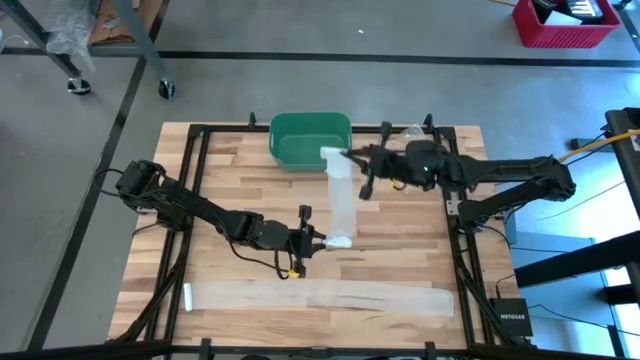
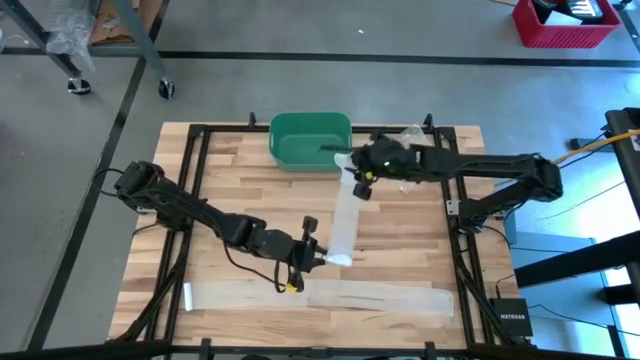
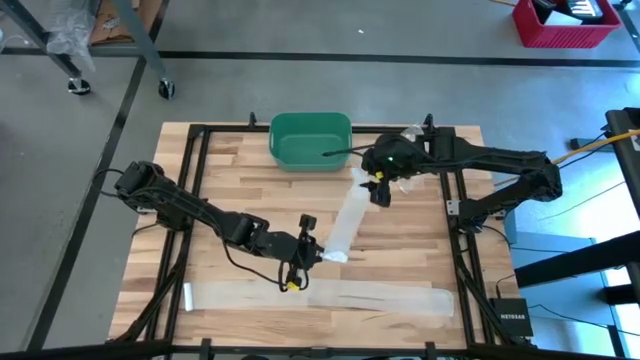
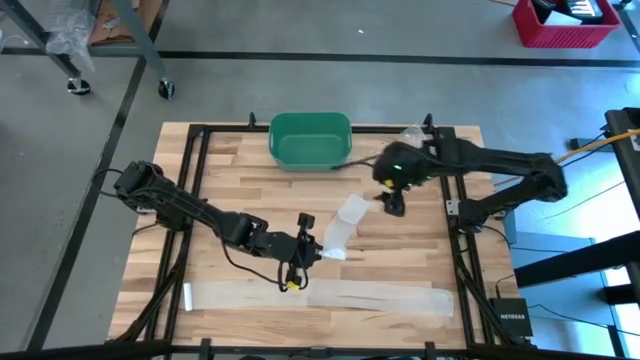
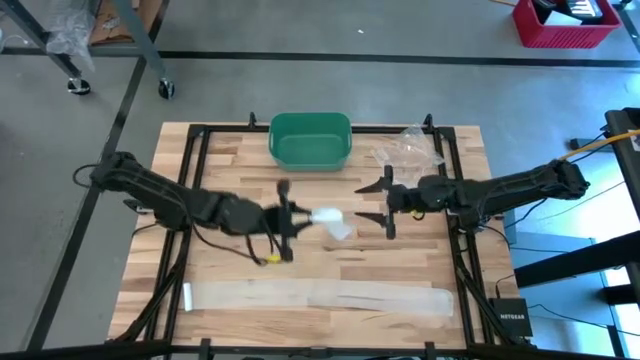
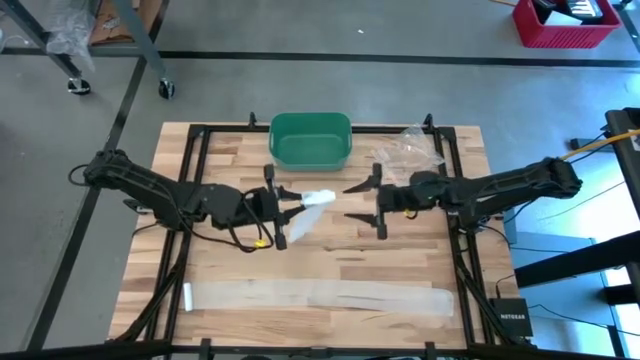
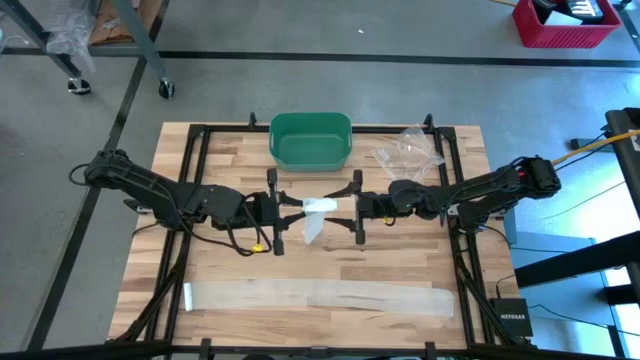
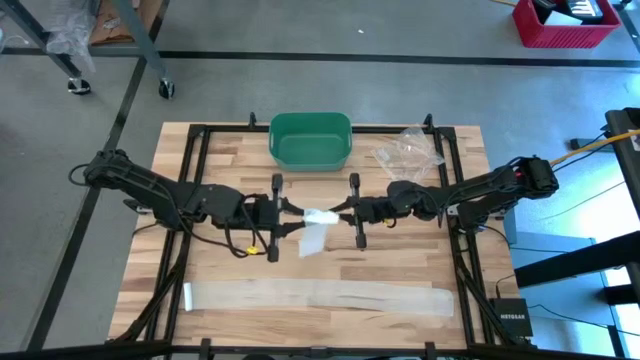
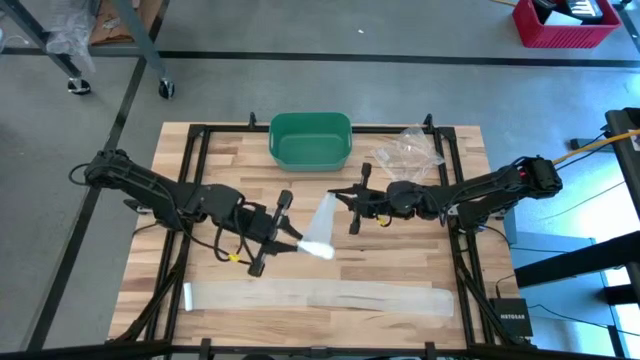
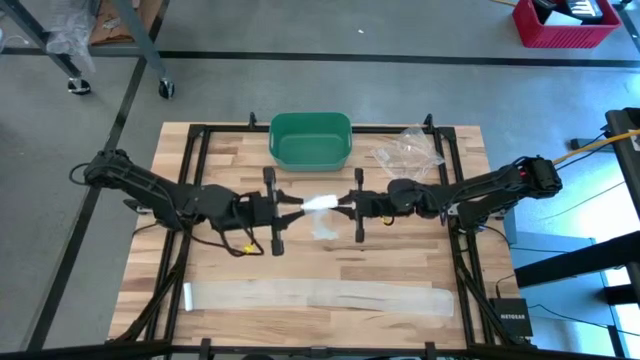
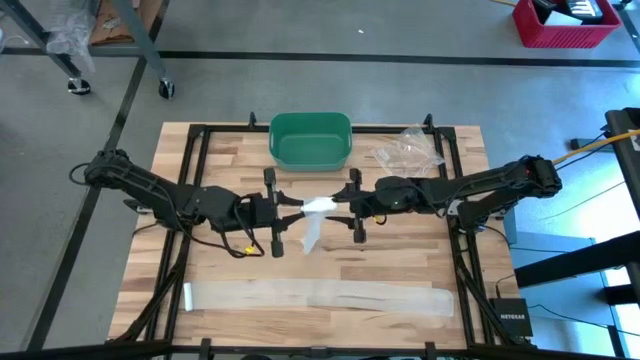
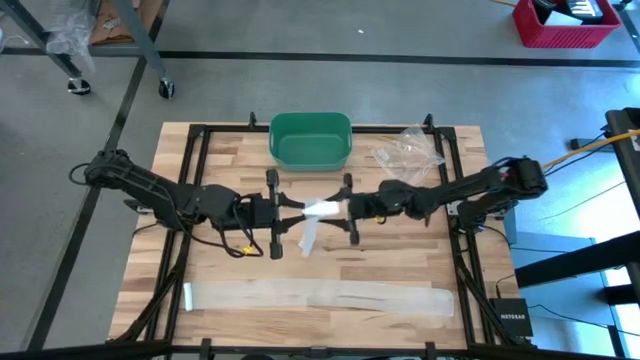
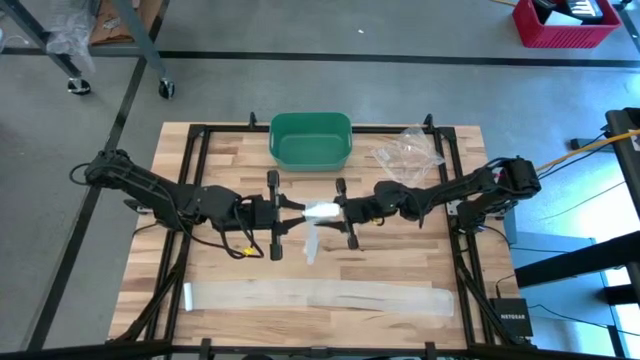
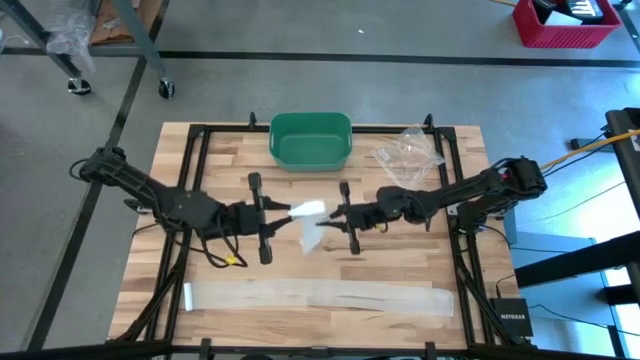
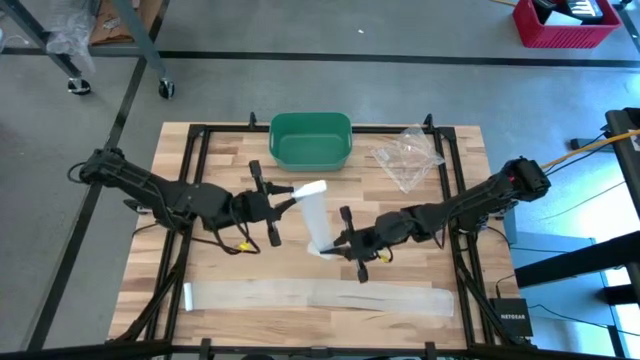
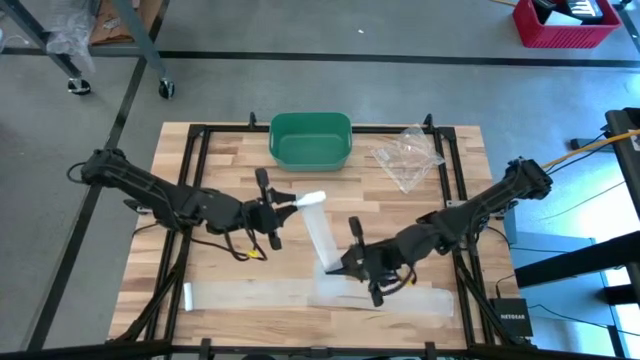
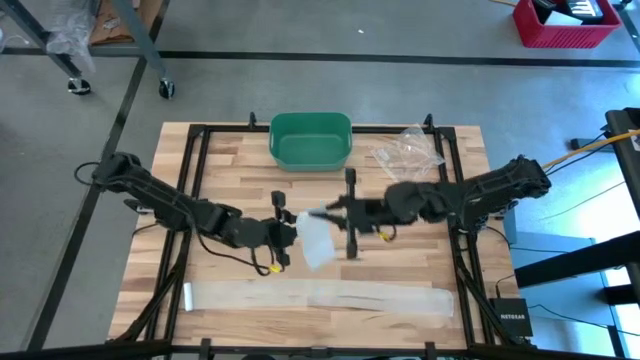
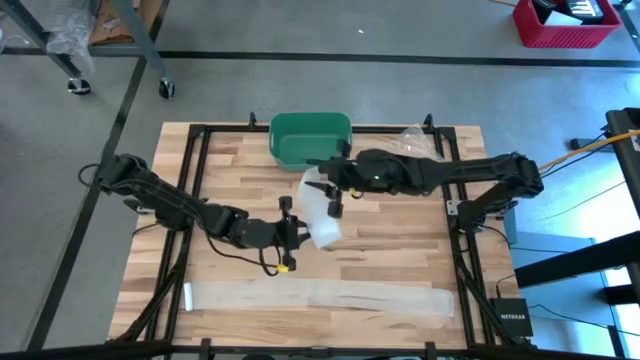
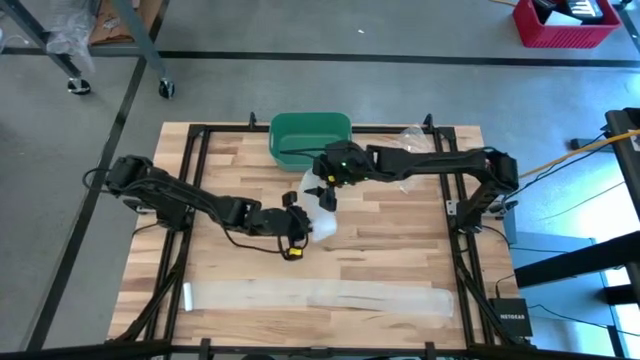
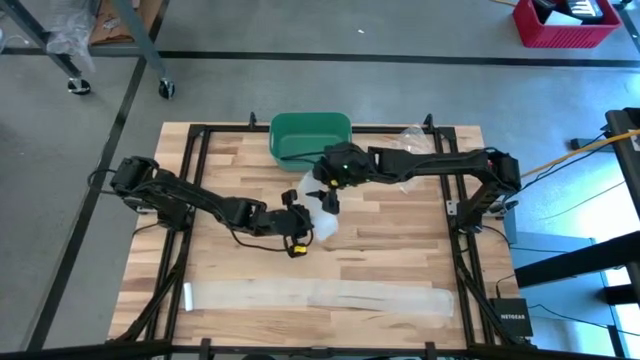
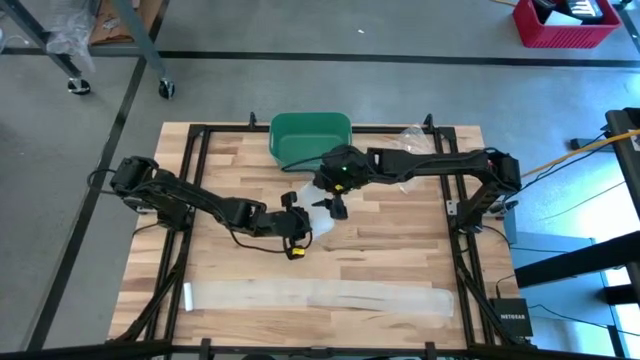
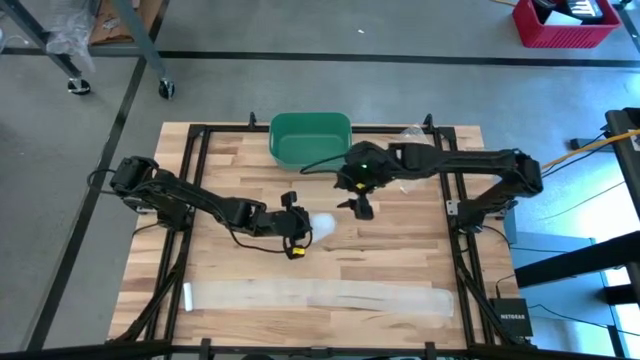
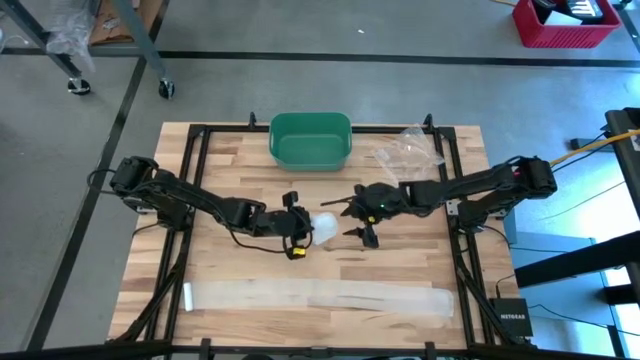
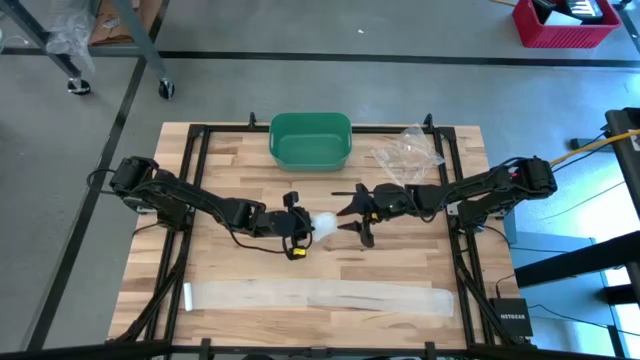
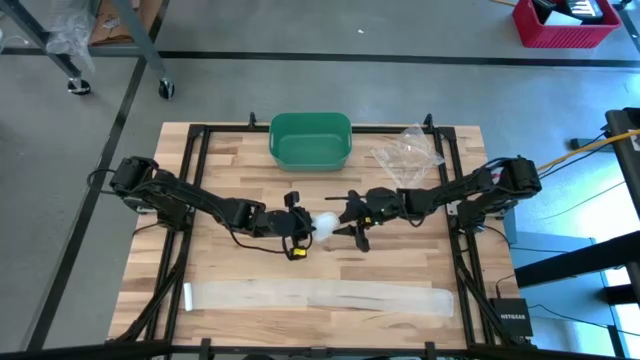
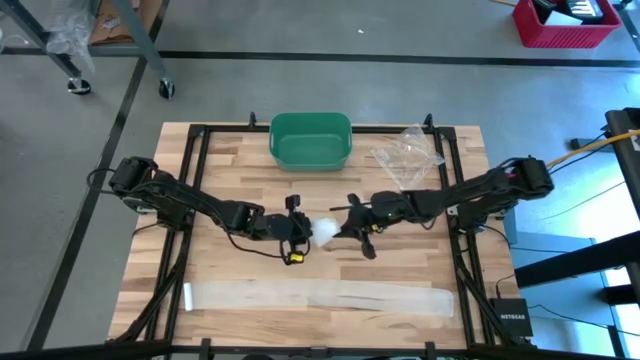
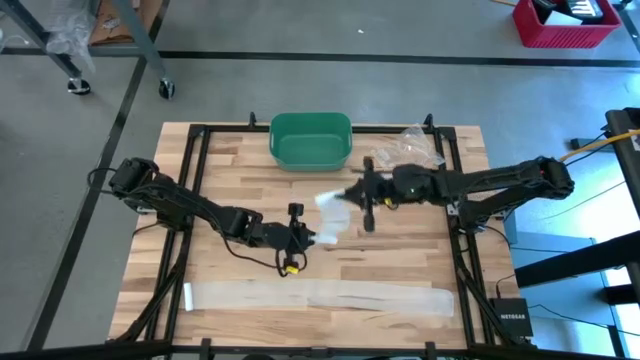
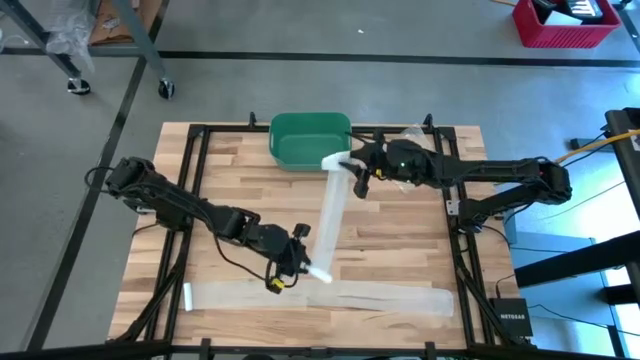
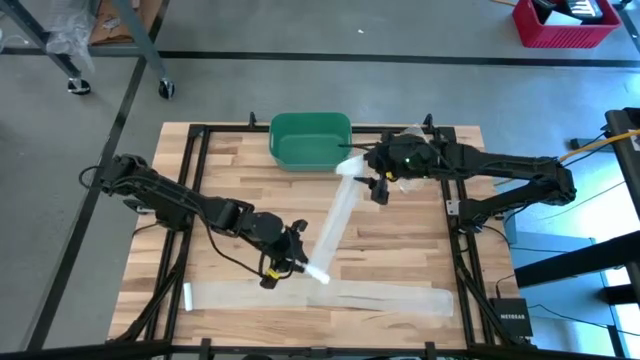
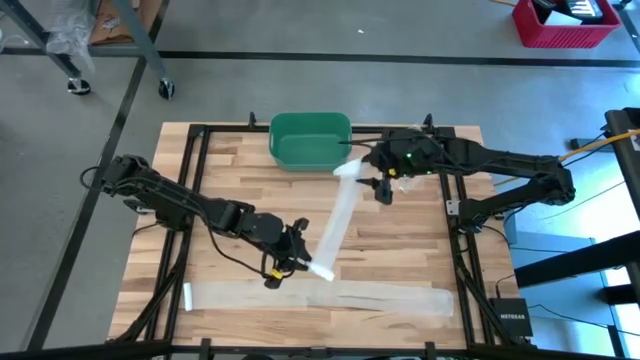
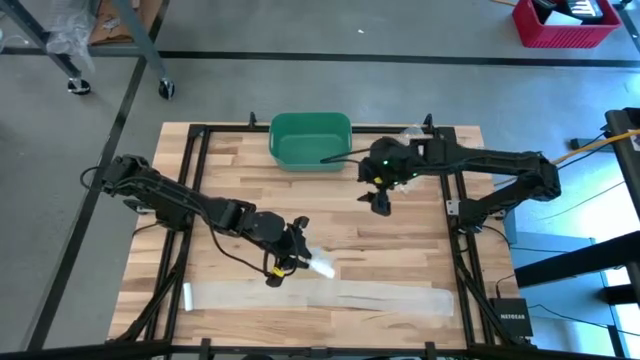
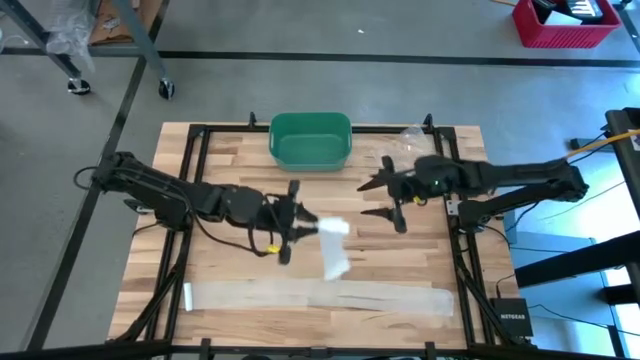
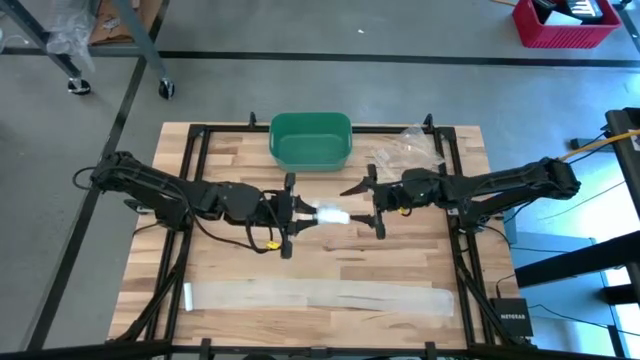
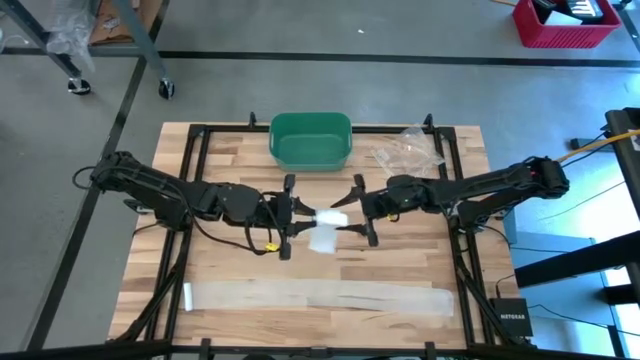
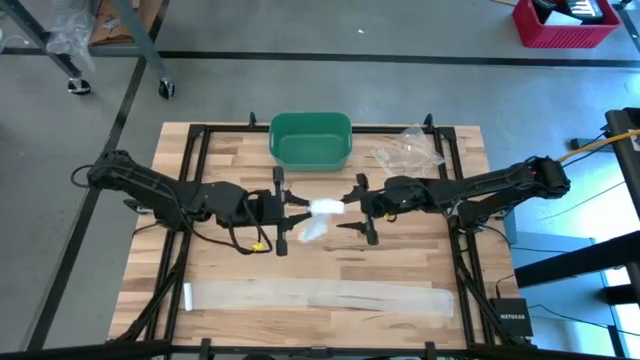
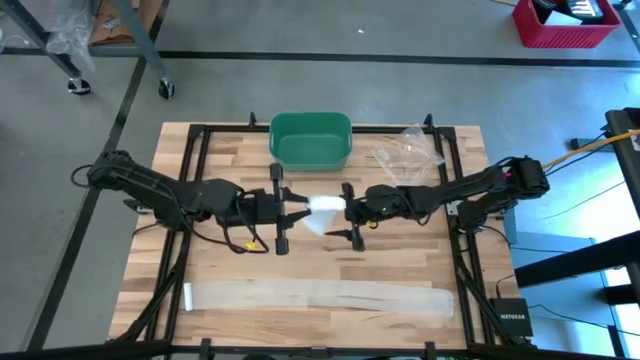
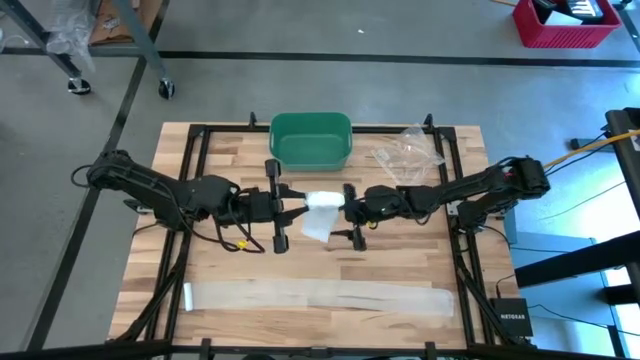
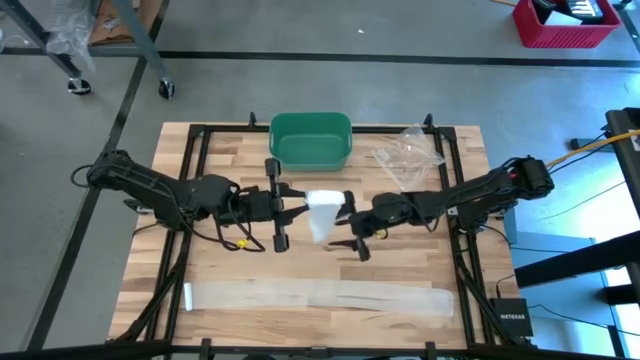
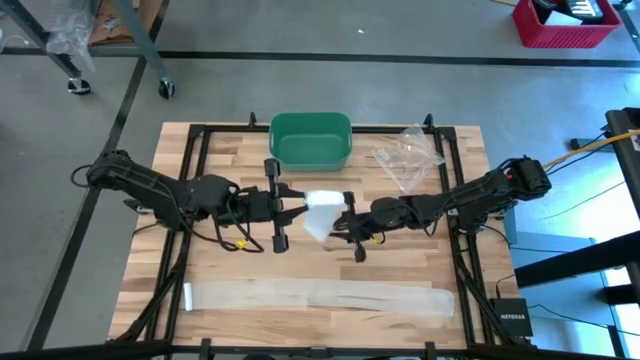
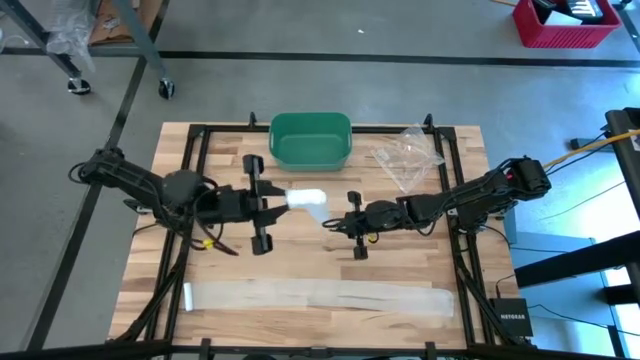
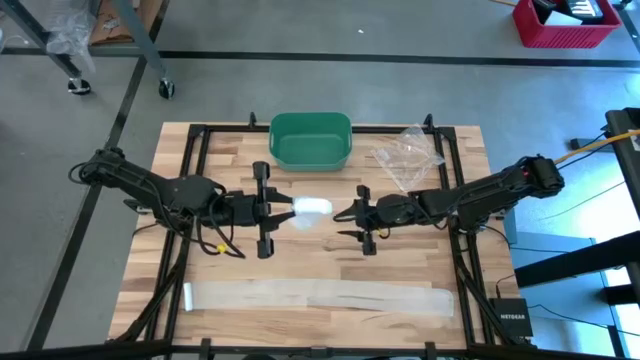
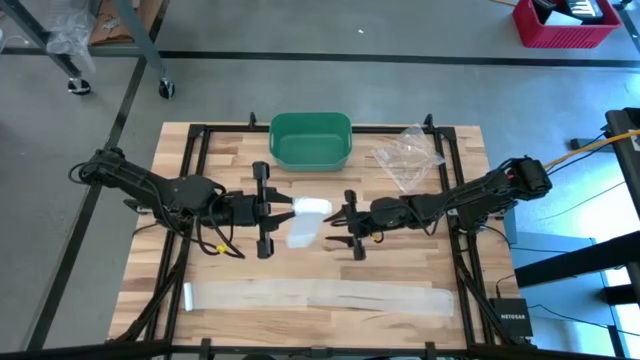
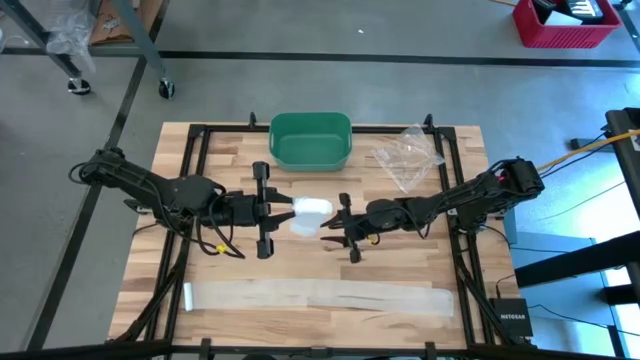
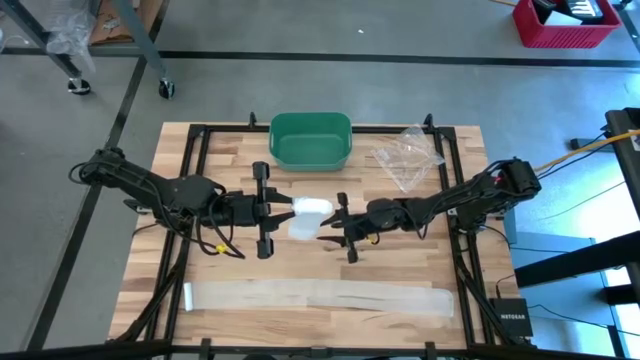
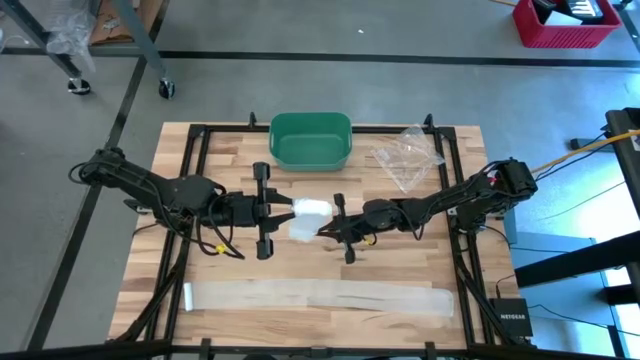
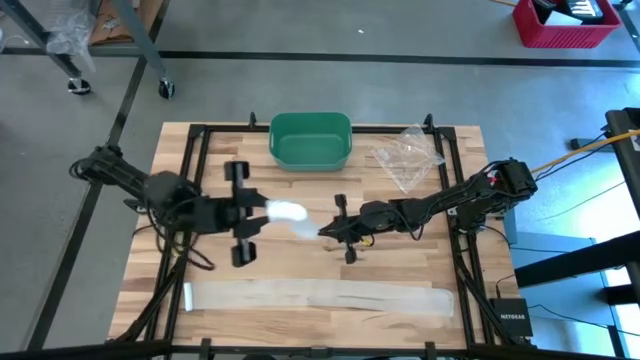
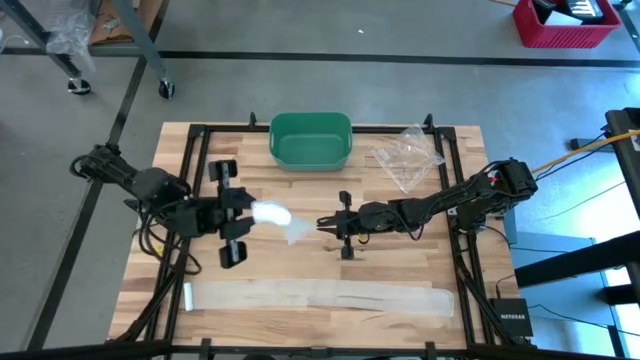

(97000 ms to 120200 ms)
Task: Roll bandage
Roll the top white bandage
